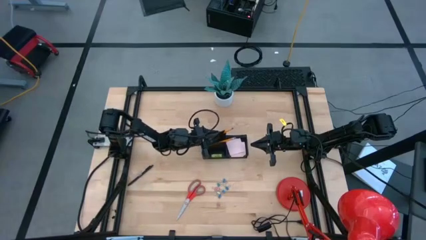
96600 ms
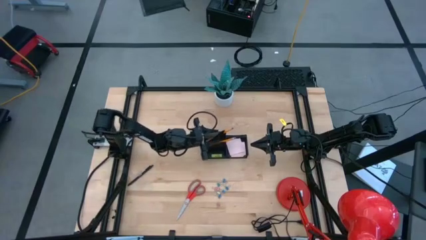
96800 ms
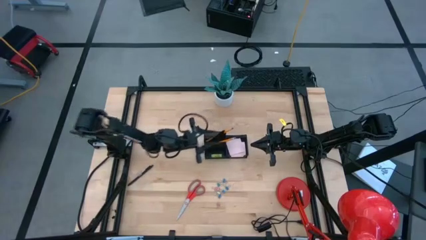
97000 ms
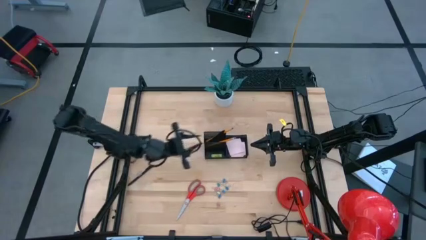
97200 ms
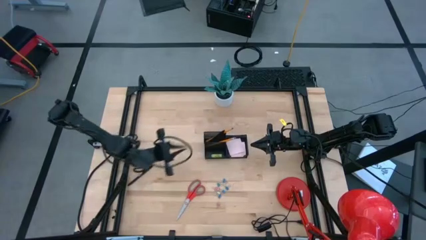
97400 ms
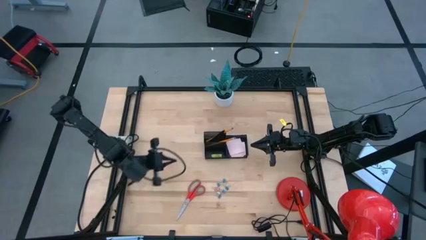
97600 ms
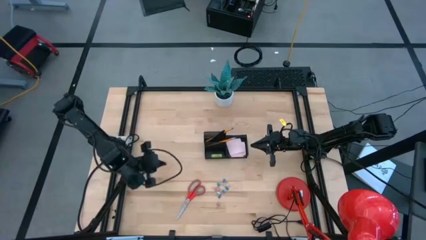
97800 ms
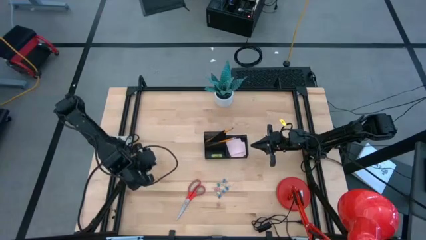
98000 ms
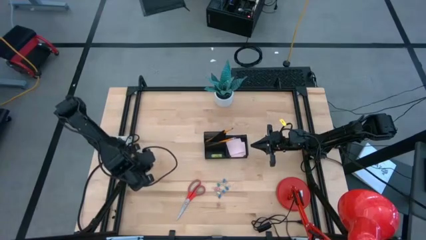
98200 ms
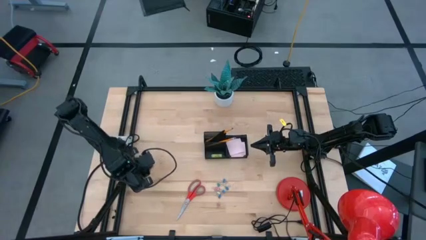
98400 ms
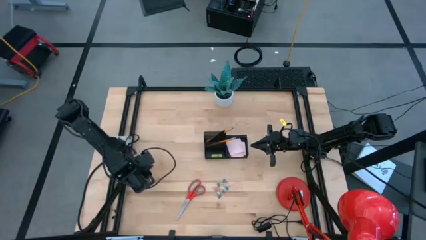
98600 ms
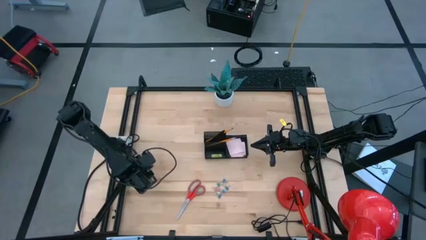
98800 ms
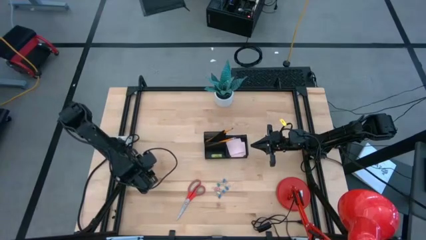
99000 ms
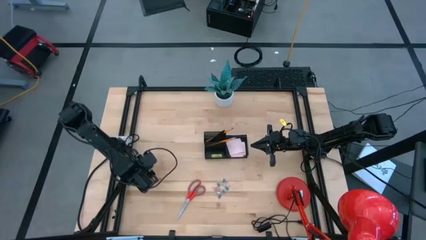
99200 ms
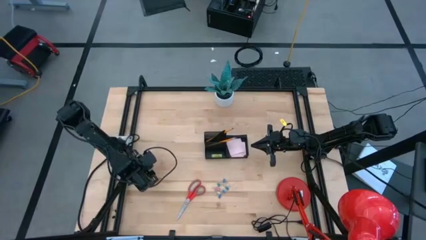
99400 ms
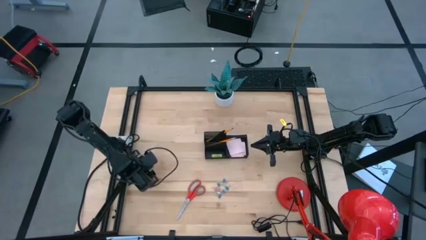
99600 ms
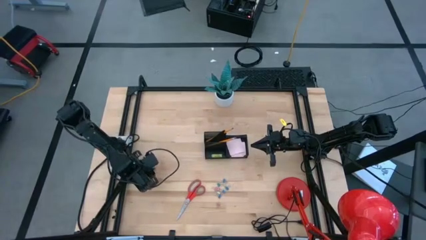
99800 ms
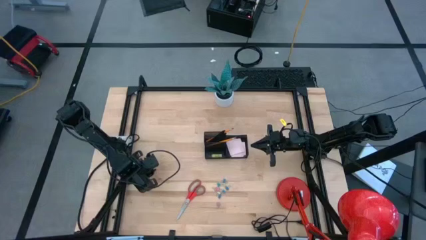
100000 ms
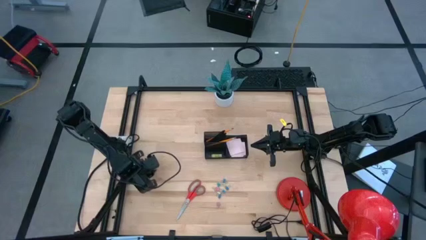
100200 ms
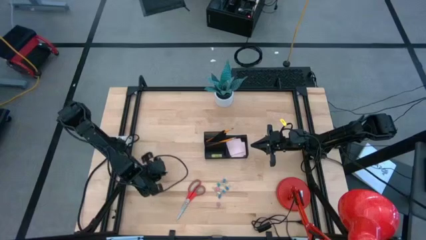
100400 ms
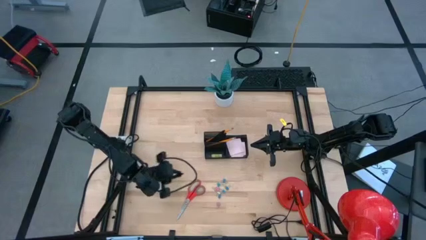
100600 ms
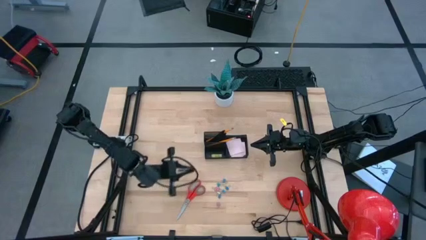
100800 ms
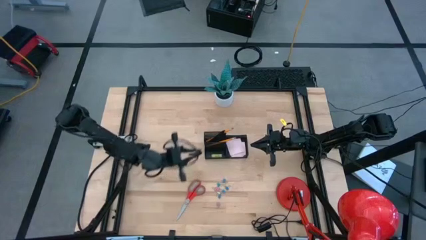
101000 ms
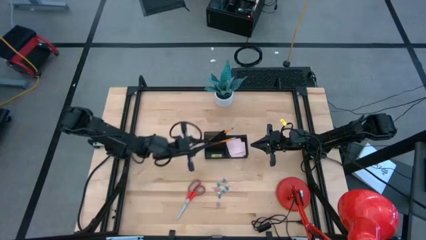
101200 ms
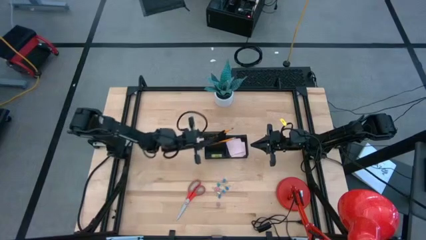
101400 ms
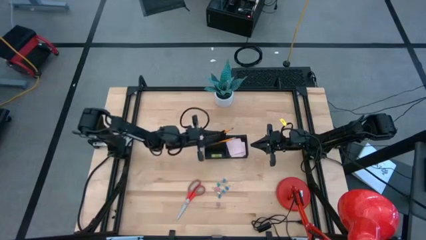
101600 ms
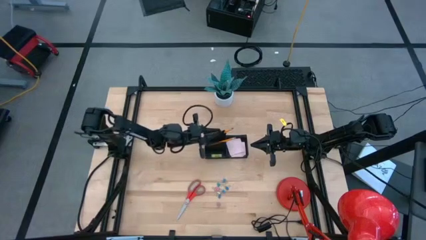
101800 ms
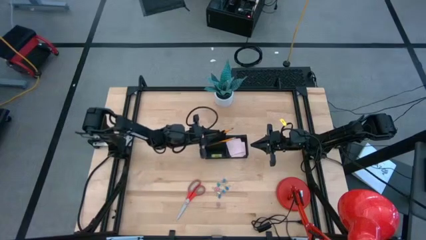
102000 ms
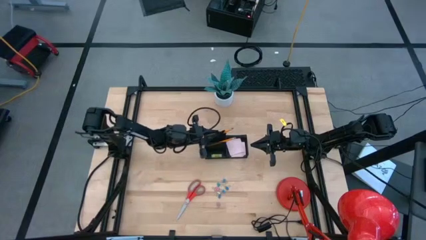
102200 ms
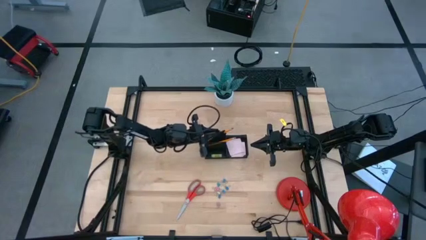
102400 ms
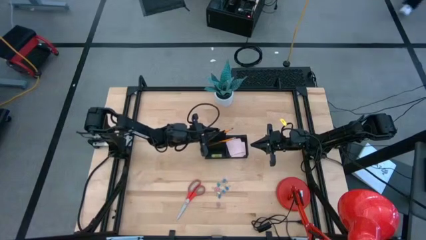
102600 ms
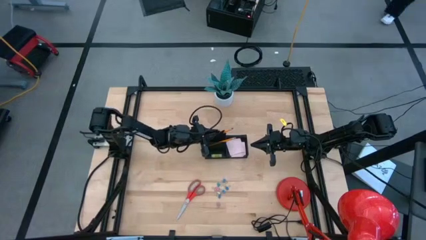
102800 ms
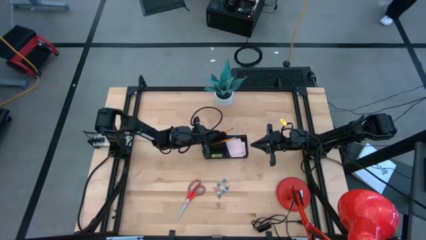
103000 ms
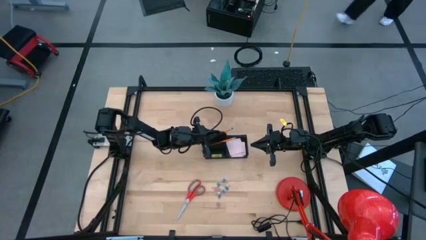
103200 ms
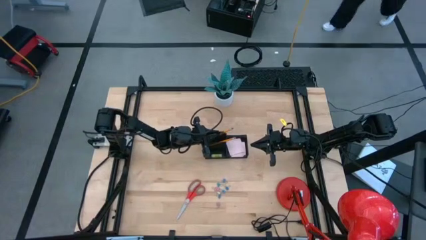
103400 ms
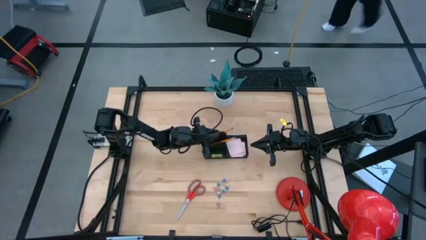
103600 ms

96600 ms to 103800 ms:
Task: Pick and place office supplies into organizer
Put the black pen into the desk organizer

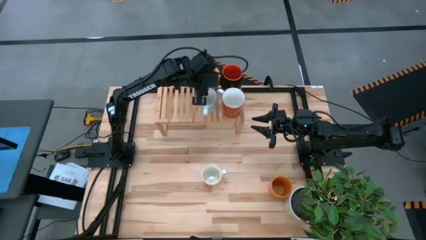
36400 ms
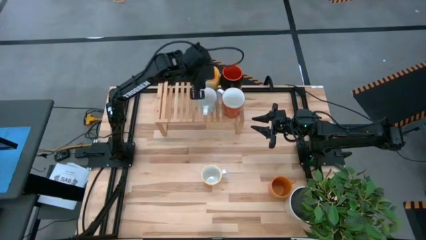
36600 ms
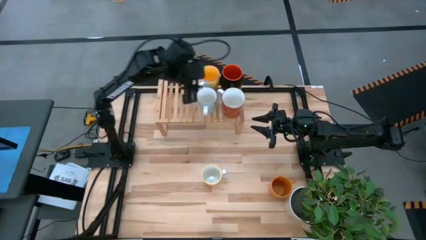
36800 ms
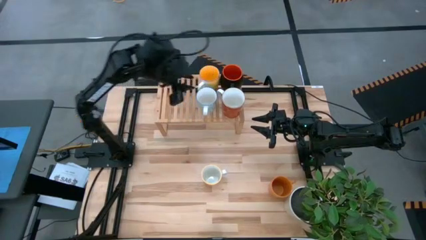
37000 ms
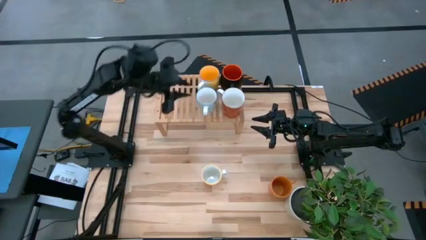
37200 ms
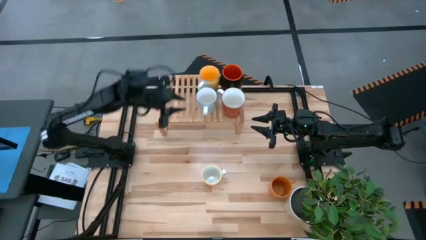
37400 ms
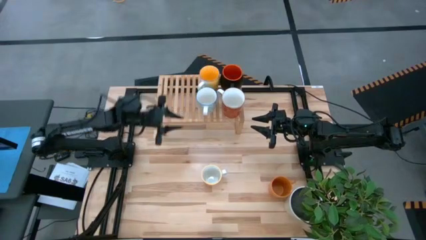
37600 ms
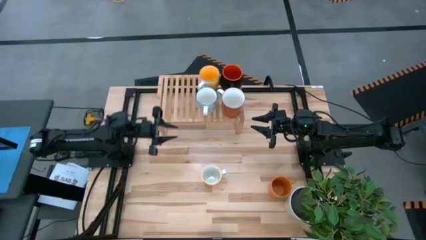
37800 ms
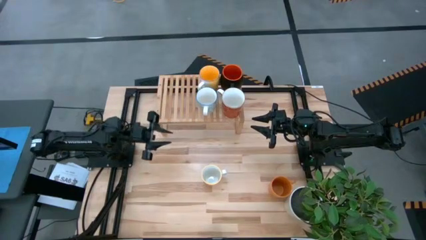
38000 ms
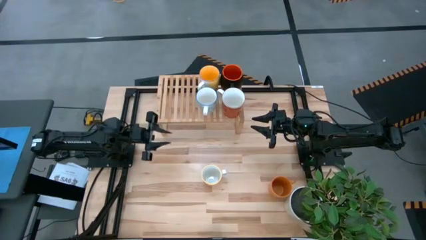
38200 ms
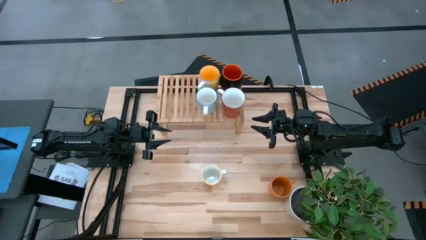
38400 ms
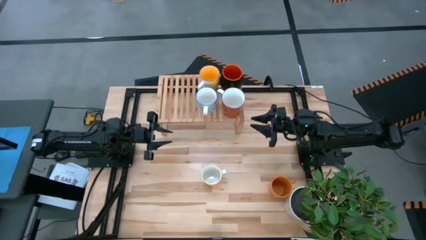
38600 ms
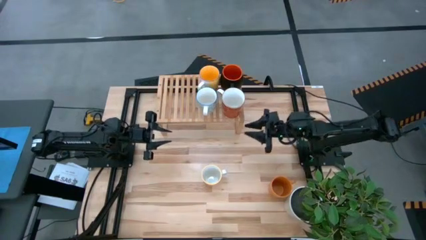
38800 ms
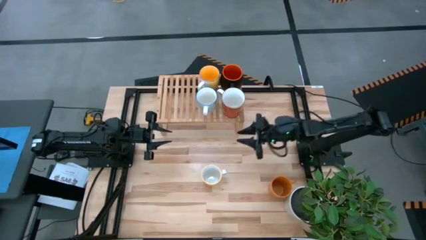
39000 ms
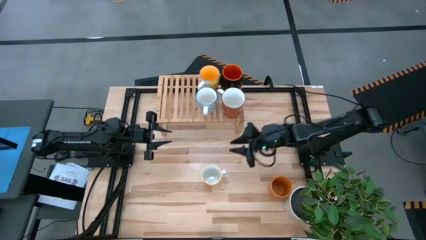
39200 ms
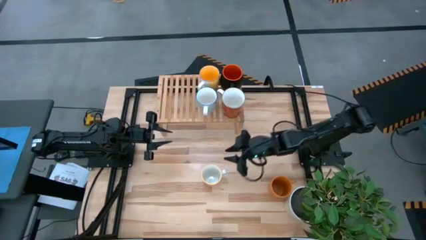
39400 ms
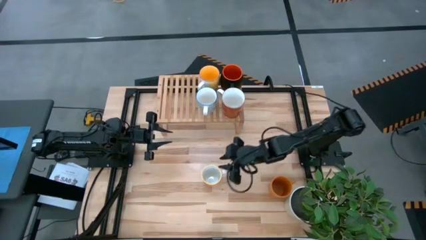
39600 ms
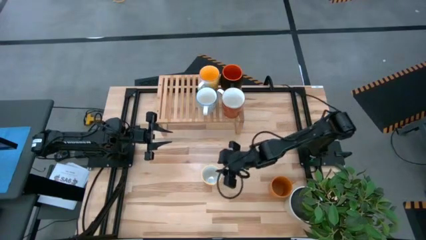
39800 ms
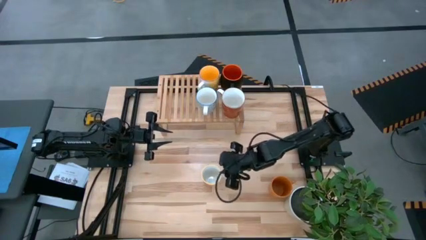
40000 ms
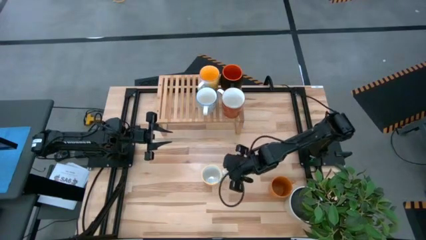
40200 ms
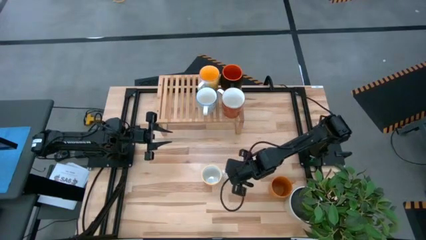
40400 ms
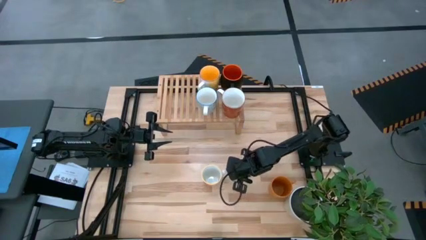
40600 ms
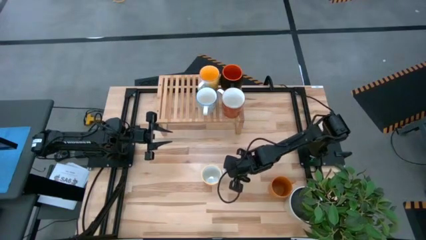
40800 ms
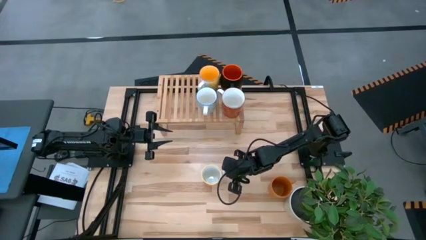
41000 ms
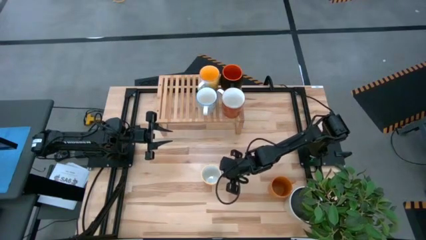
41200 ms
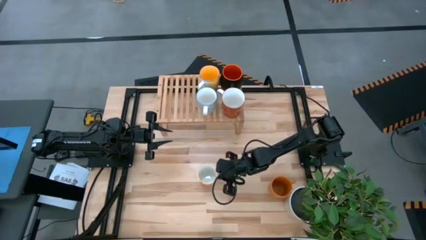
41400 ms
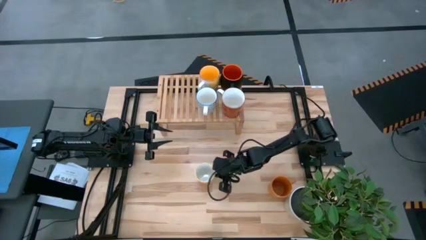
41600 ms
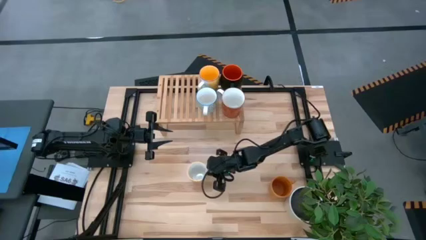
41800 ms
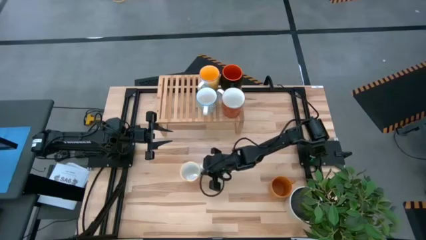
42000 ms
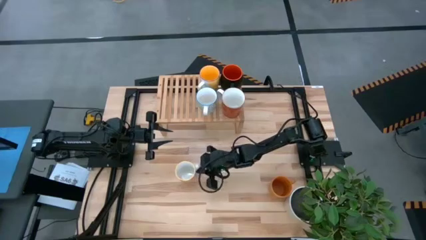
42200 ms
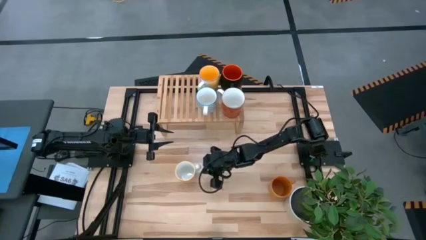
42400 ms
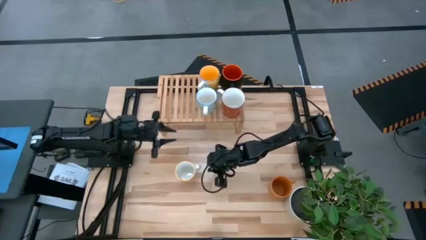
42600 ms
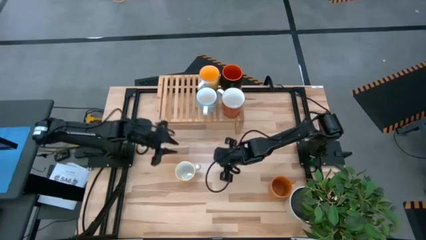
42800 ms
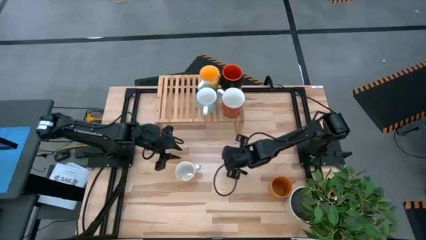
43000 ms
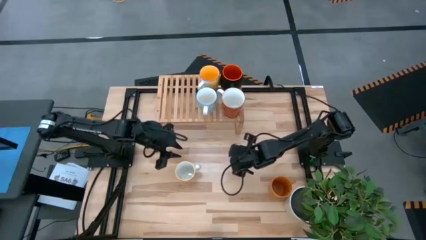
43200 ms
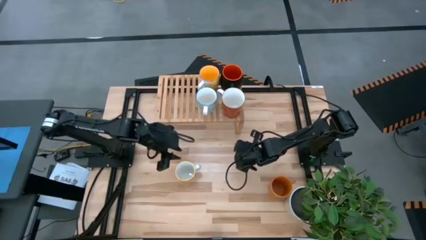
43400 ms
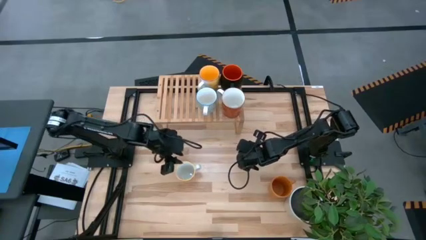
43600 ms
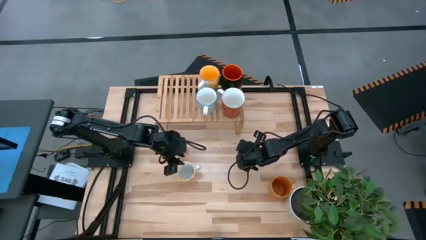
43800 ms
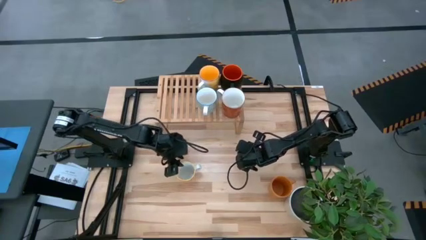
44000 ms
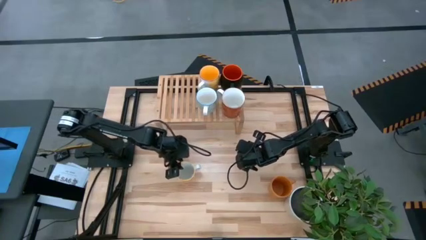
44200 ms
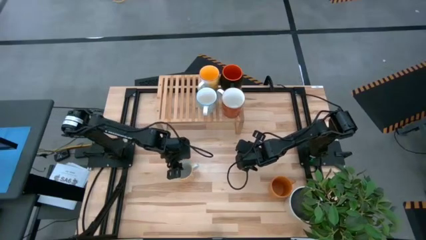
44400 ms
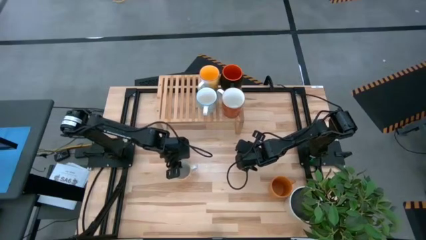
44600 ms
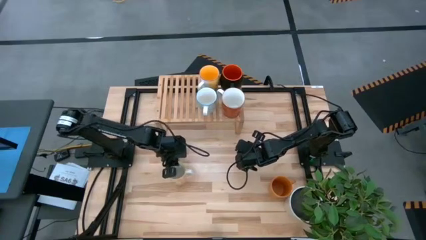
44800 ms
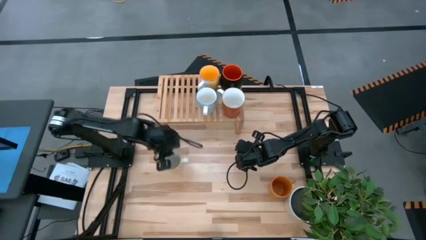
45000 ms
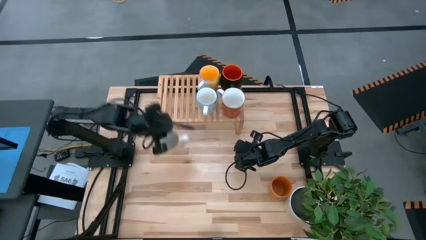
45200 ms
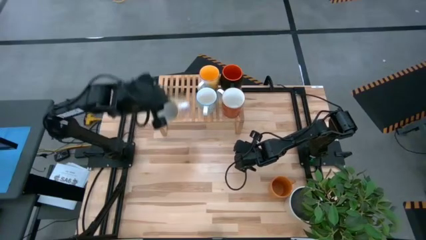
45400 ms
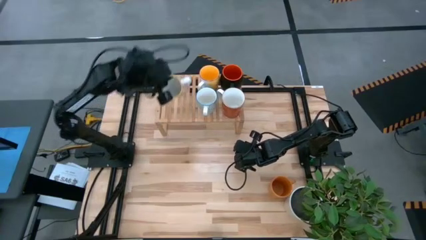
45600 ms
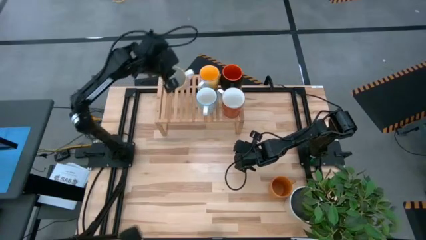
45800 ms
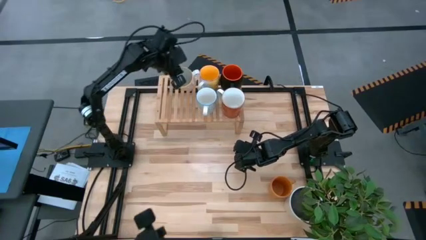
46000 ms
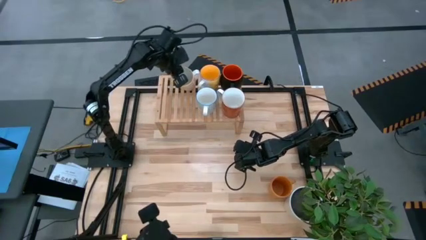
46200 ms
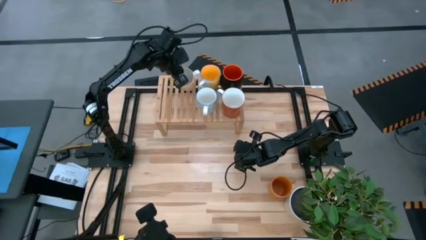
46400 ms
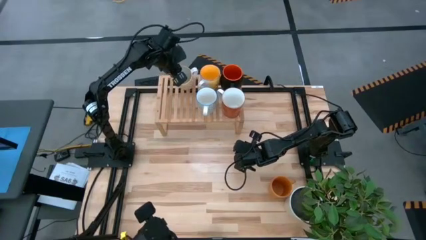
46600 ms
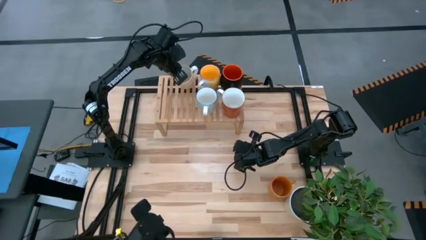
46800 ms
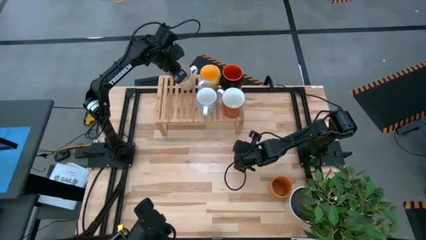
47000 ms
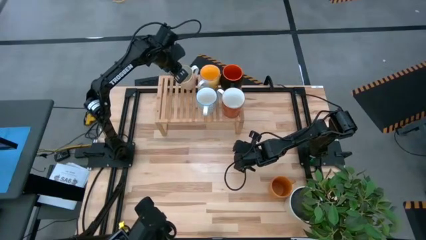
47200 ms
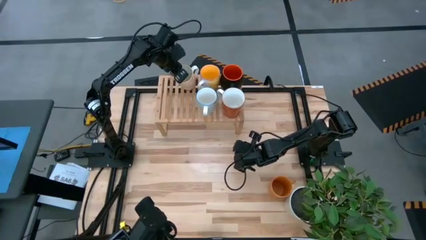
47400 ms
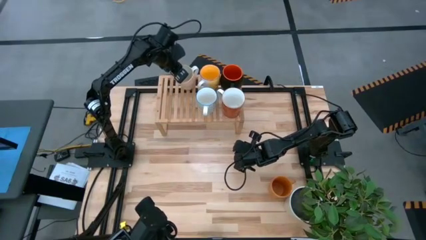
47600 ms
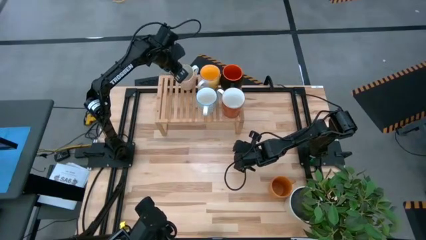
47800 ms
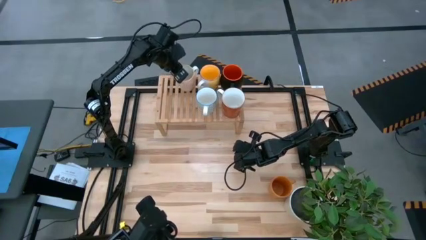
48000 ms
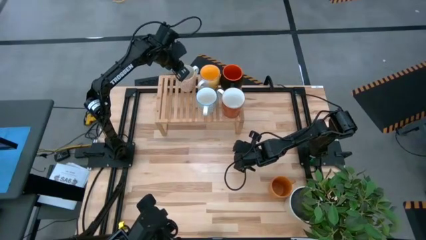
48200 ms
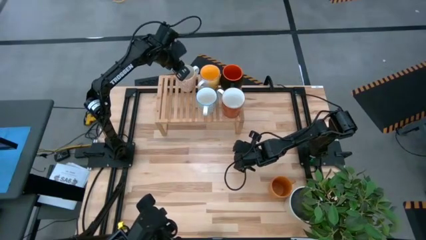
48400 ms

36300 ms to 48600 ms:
Task: Place coffee mugs
Put the orange patterned mug on the shelf
